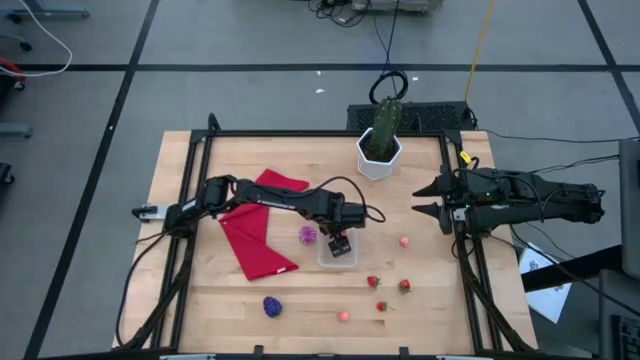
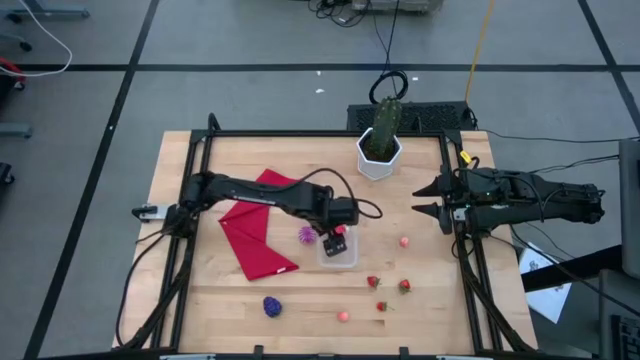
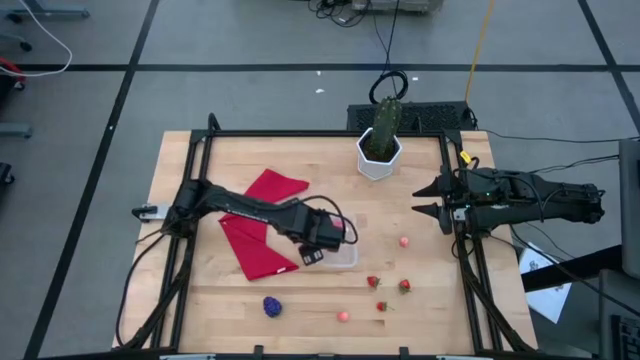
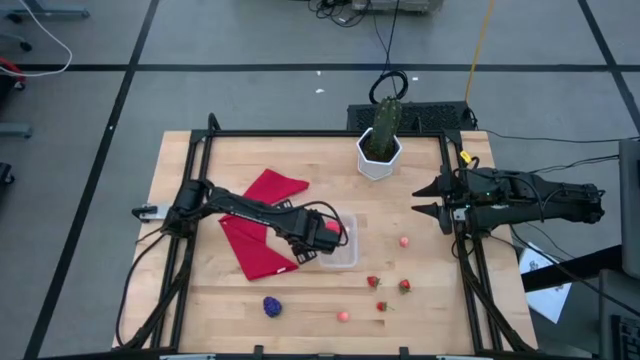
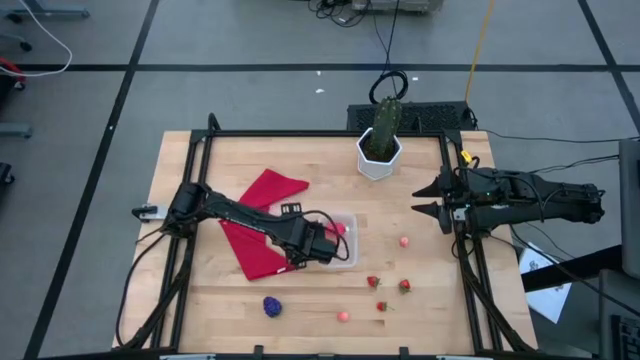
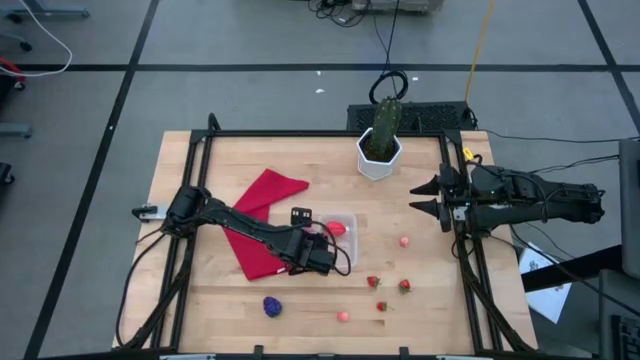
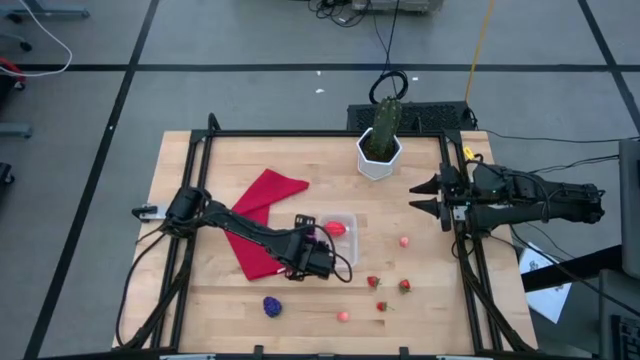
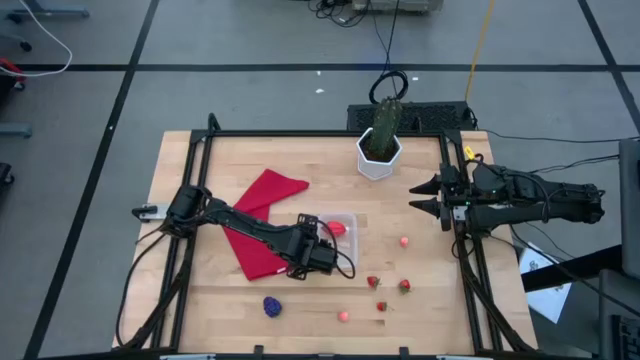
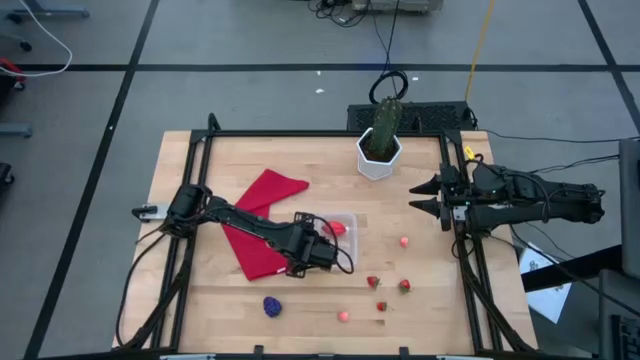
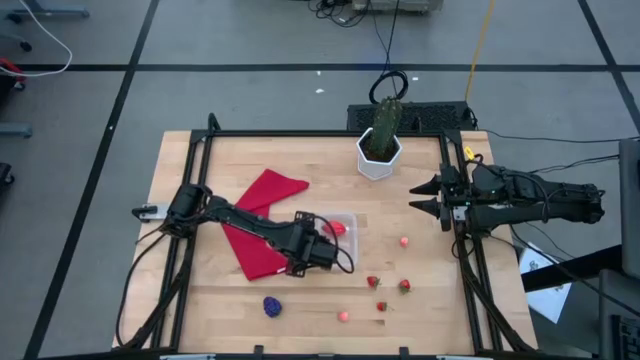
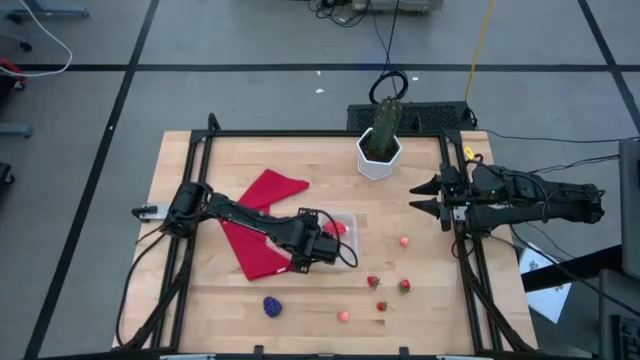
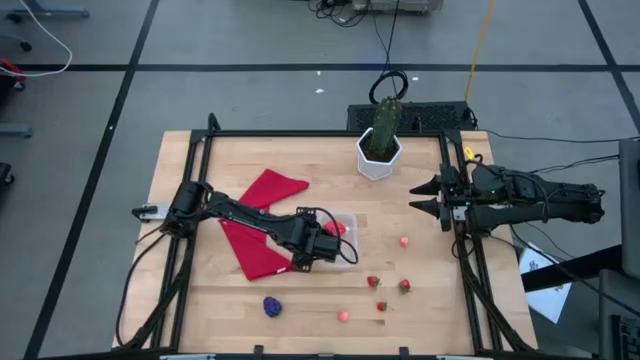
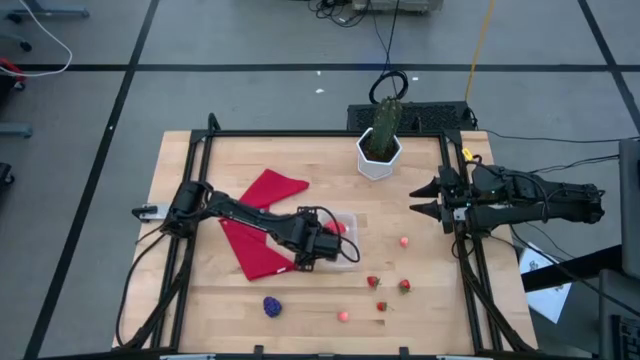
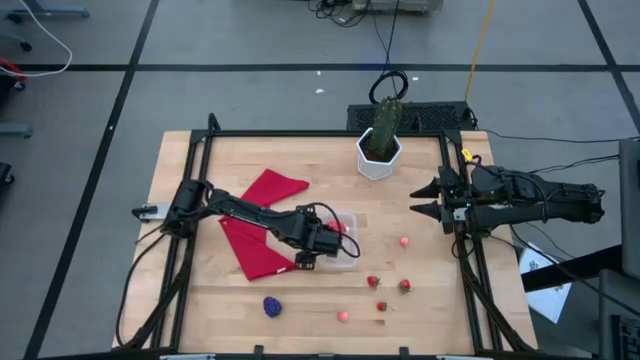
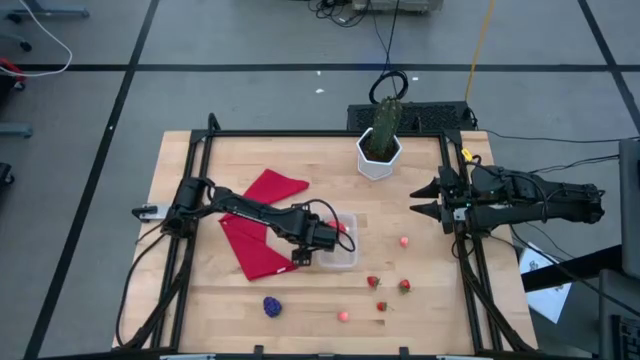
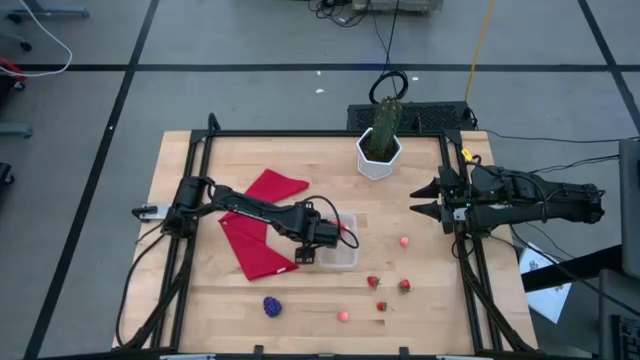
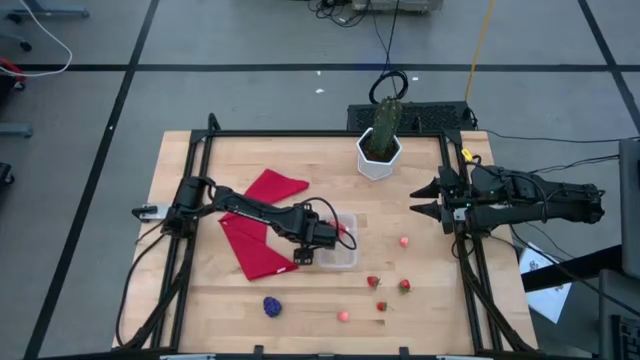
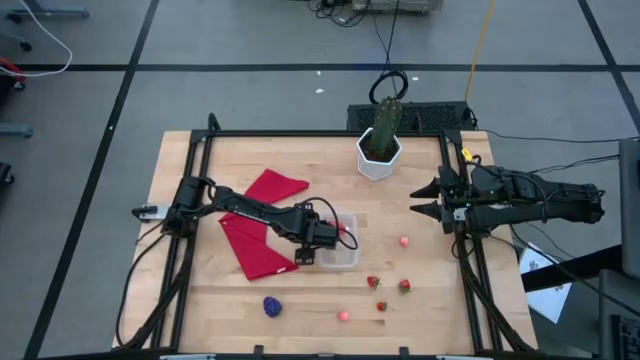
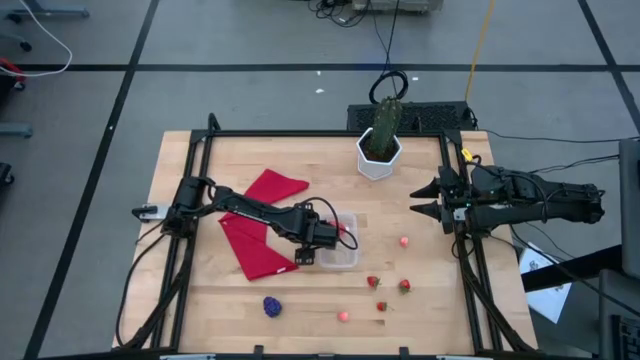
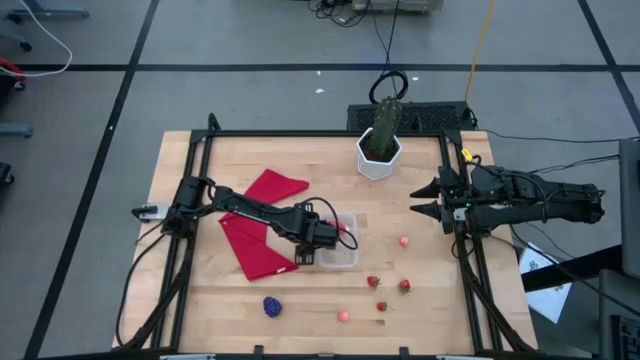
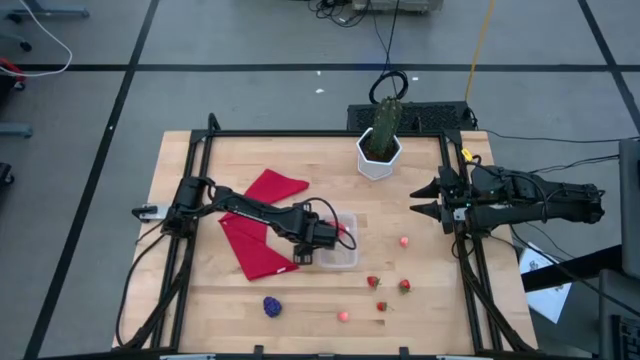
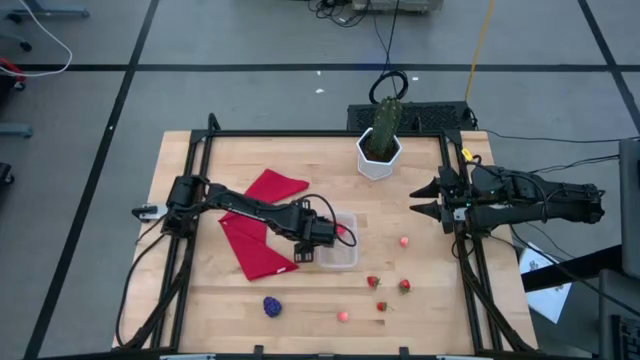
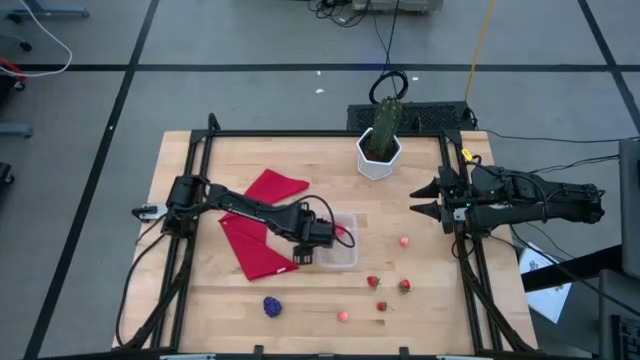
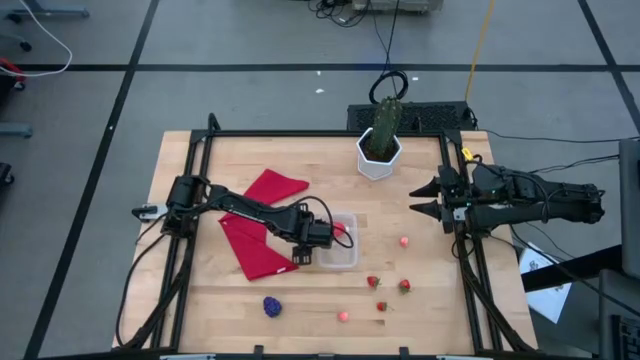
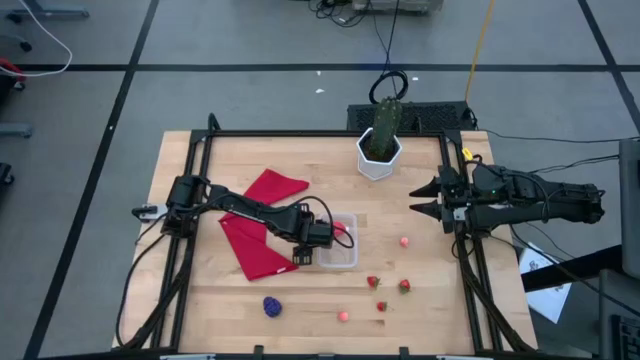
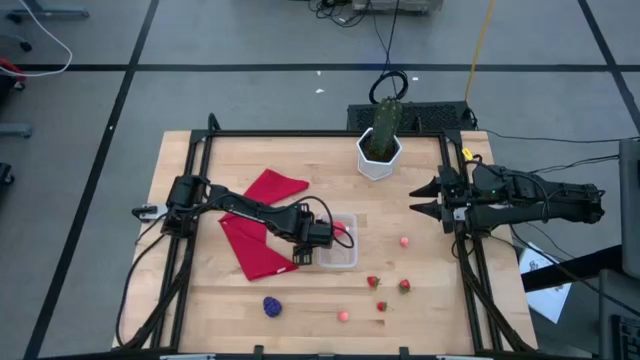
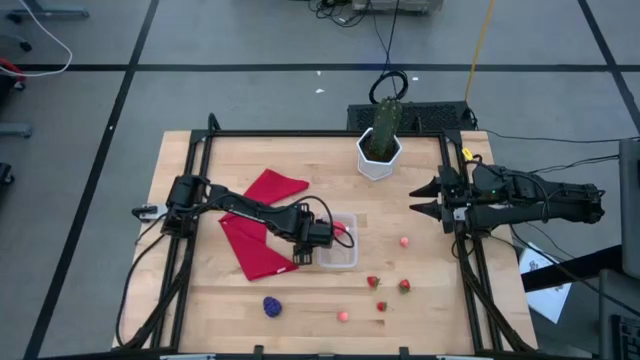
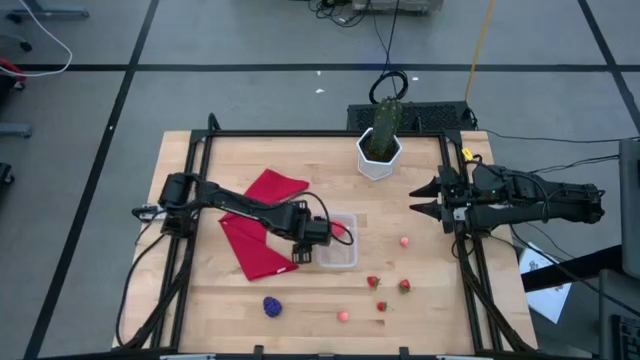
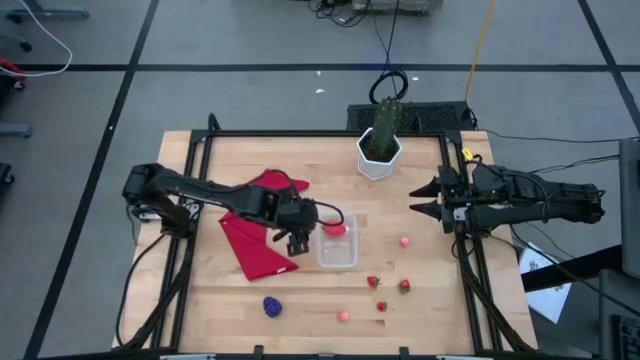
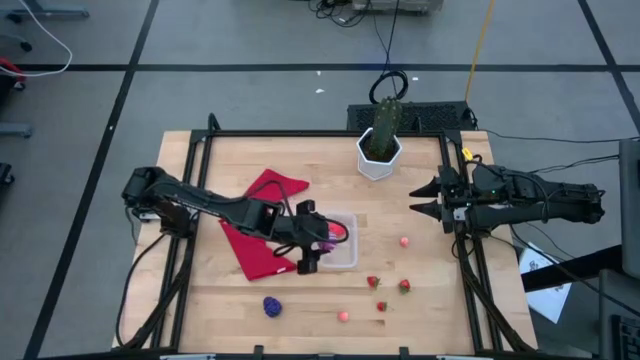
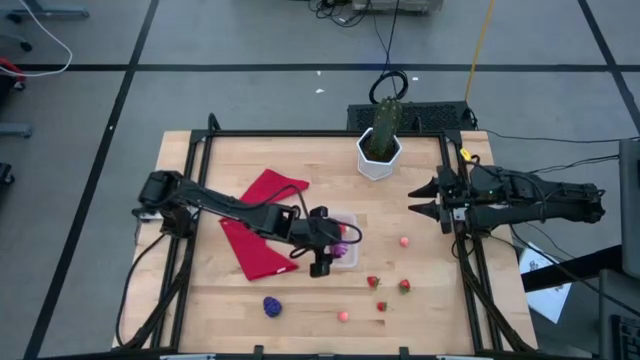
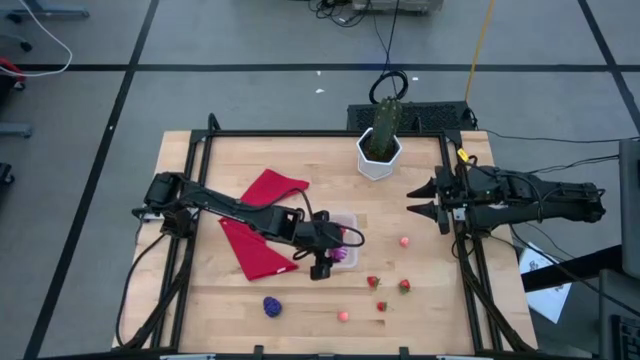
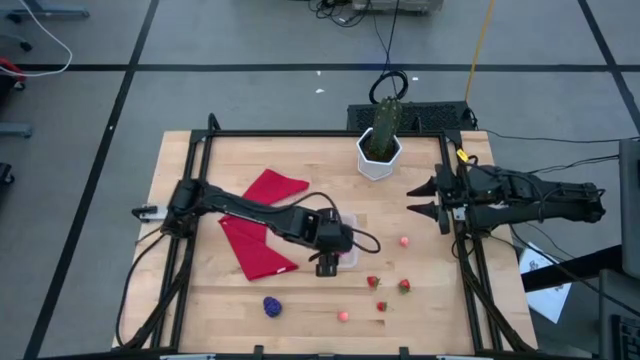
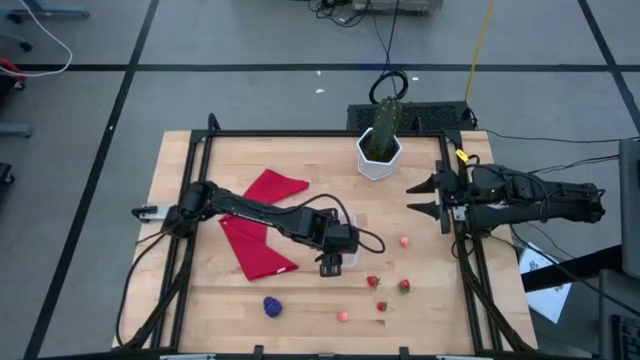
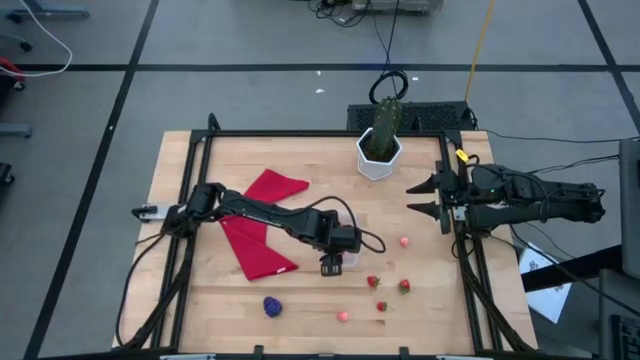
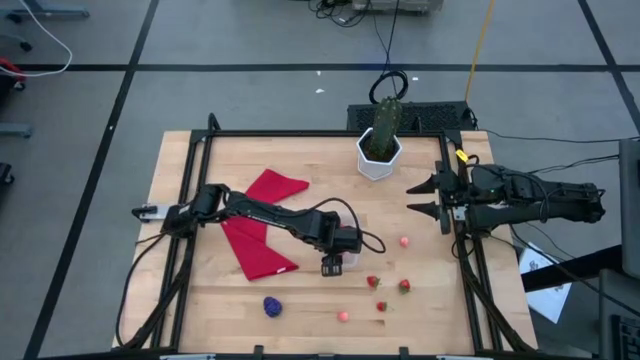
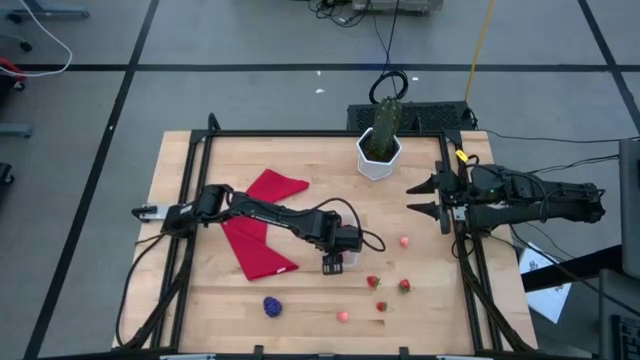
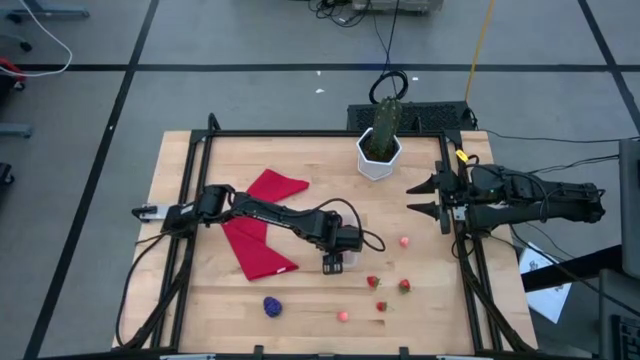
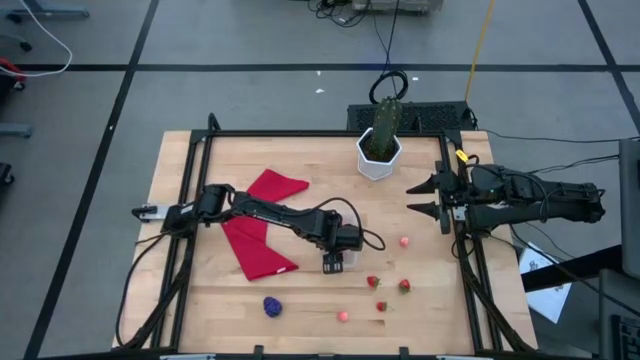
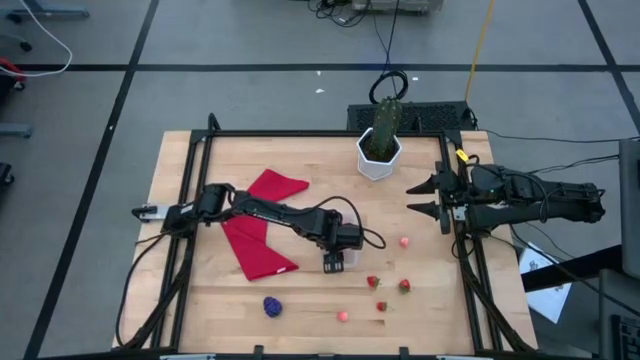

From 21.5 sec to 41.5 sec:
Task: Pick and placing Produce into tupperware
Put the purple onion into the transparent bin
